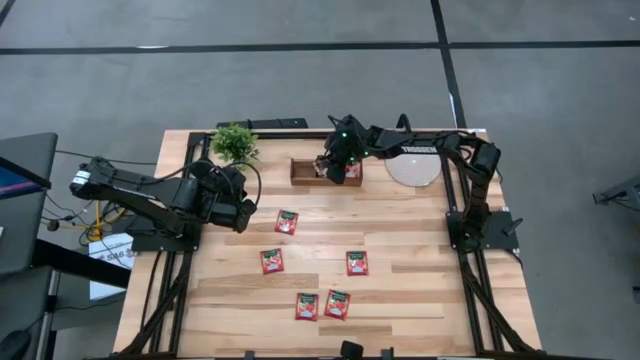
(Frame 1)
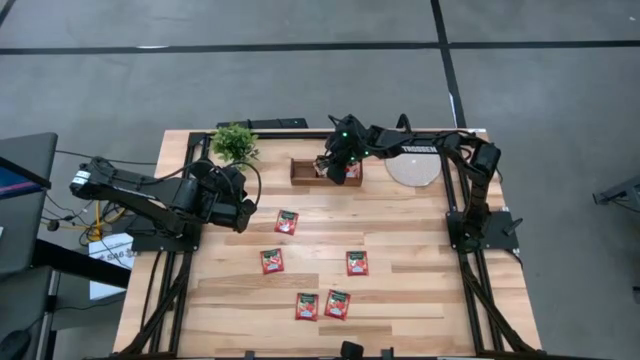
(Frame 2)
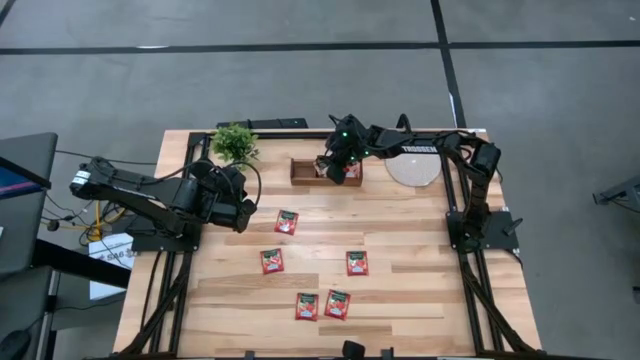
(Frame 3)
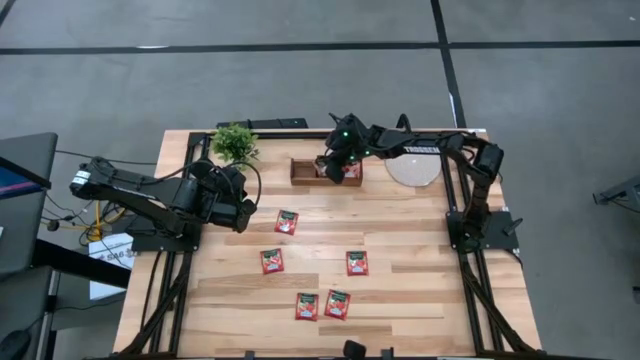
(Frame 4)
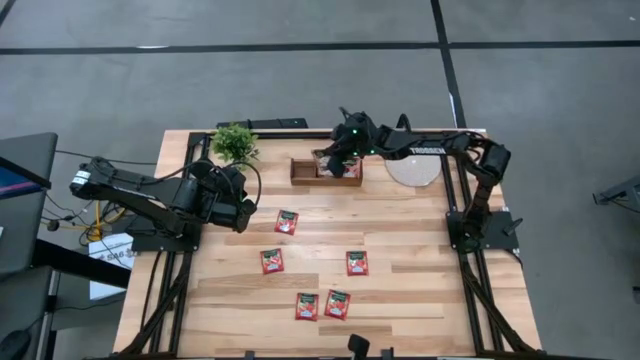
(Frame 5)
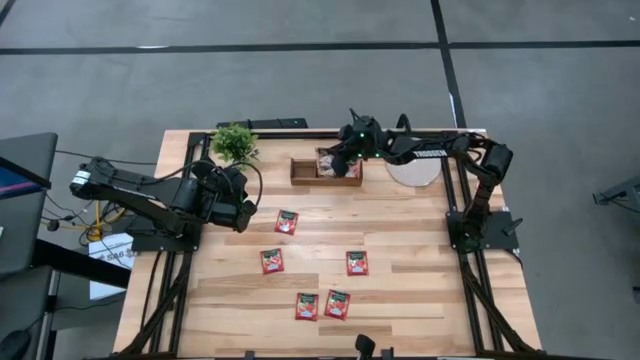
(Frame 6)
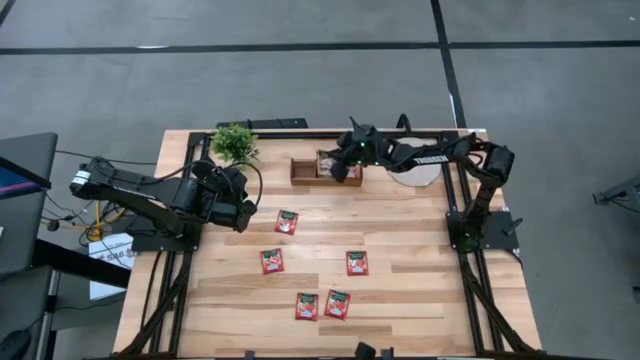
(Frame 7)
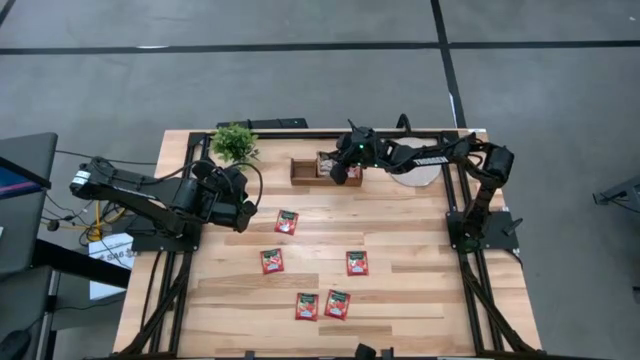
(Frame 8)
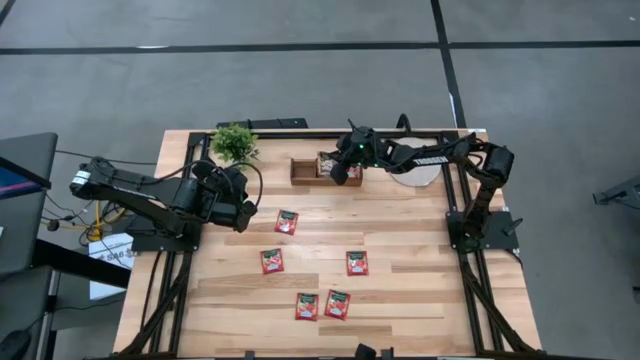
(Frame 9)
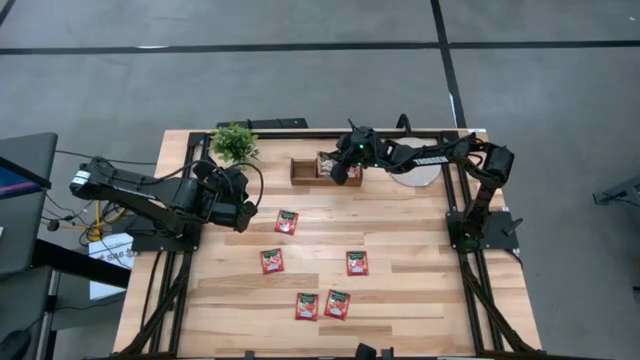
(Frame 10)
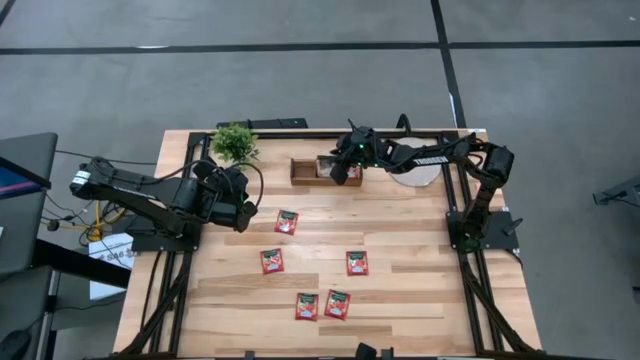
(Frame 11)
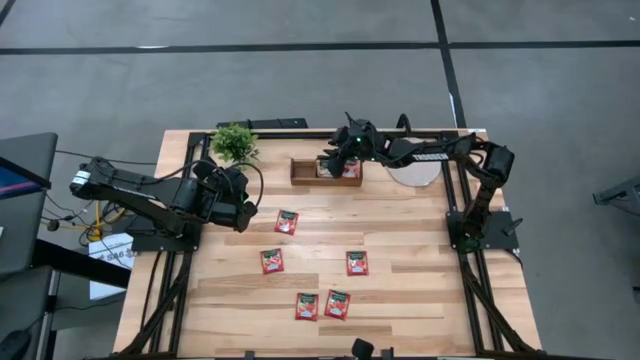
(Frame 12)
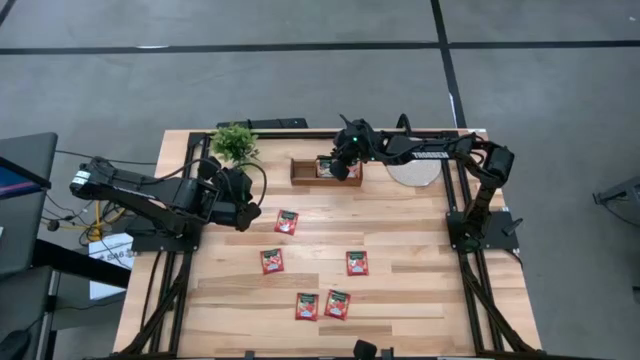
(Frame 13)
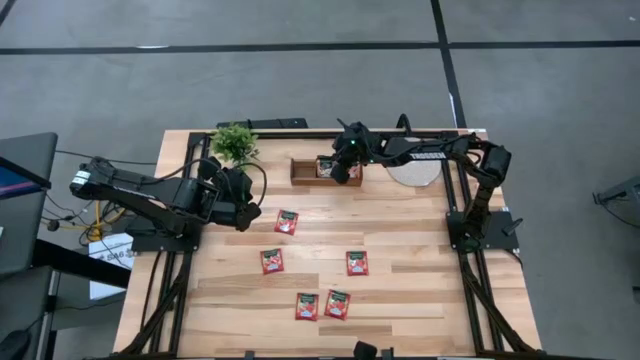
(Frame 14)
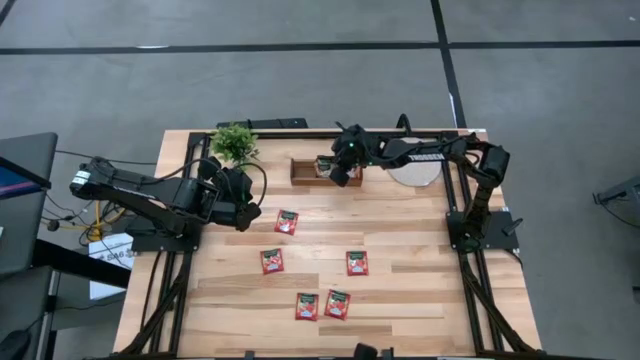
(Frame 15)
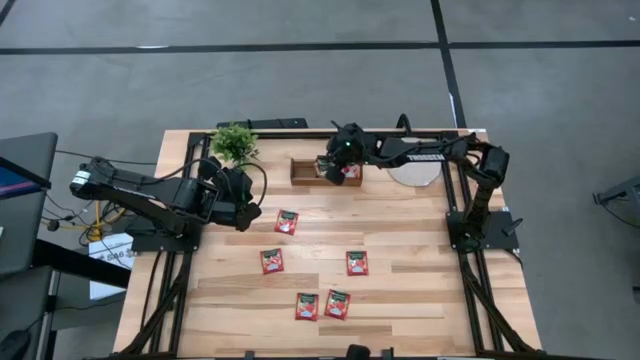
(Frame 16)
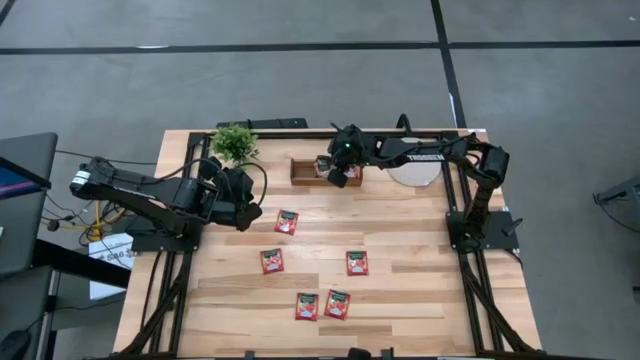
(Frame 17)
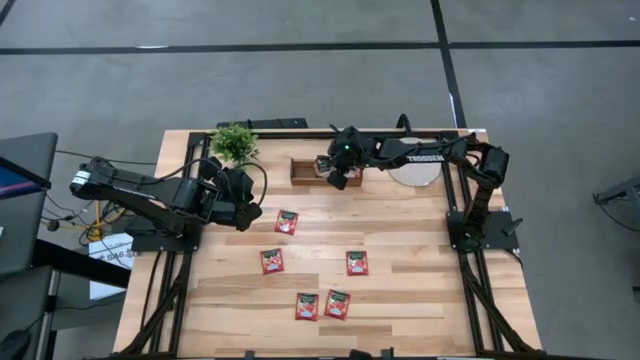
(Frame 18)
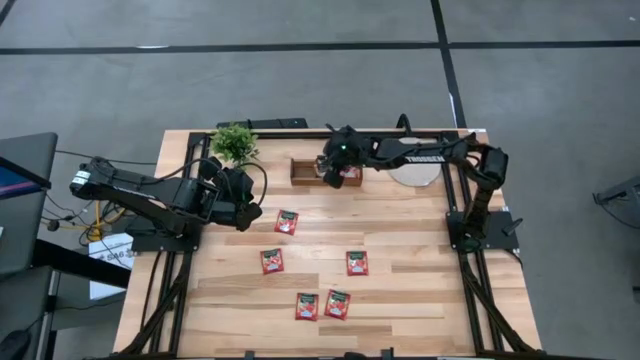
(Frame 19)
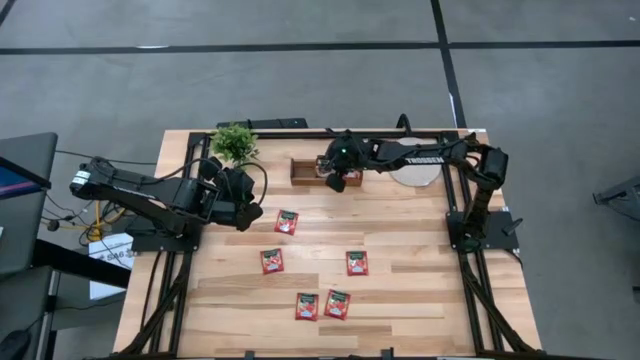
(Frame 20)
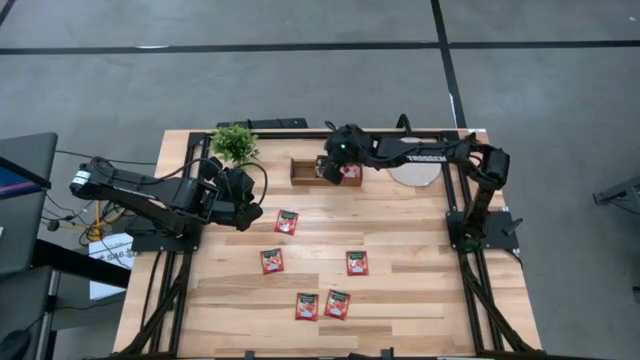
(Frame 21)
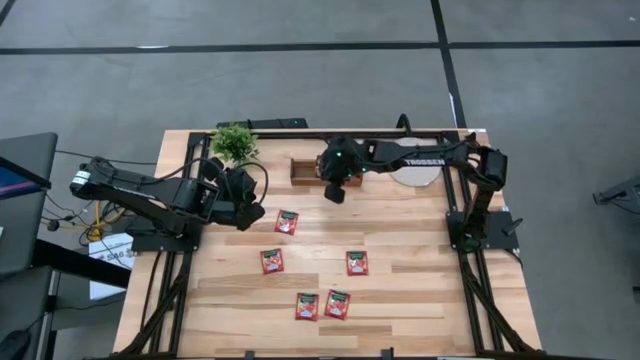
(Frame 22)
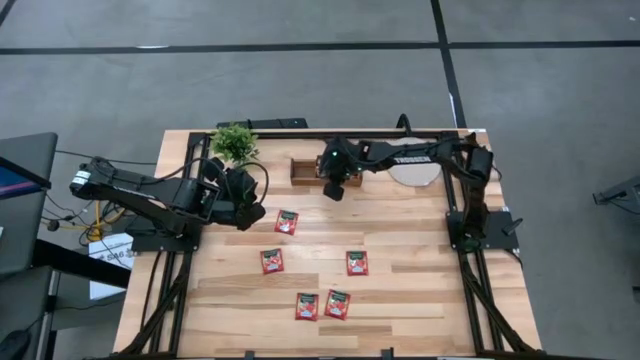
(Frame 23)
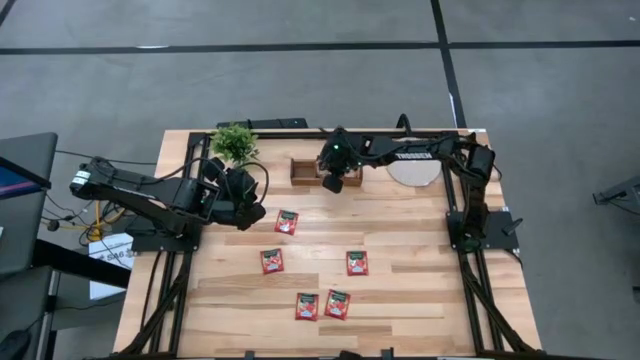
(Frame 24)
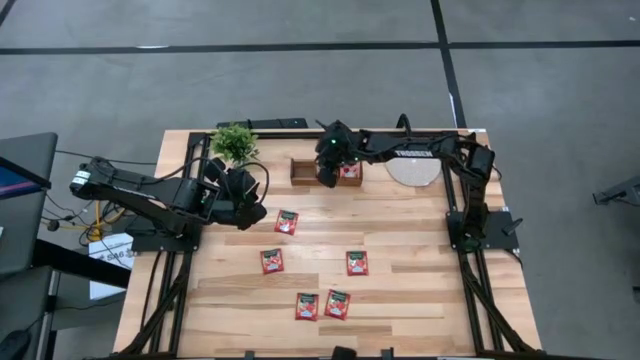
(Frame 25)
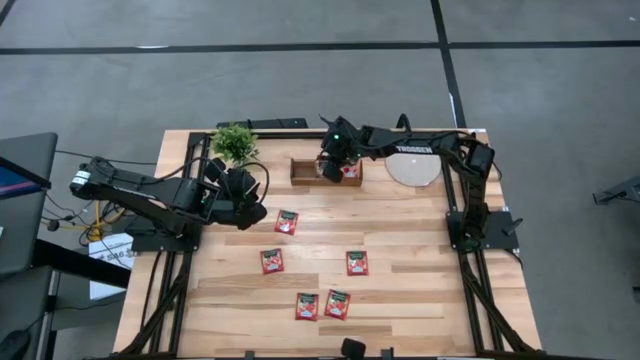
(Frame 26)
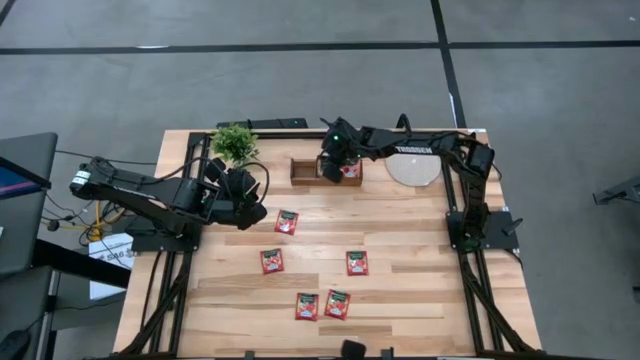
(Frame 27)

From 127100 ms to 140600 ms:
Task: Pick & Place Tea
Put the brown tea bag into the middle section of the wooden organizer

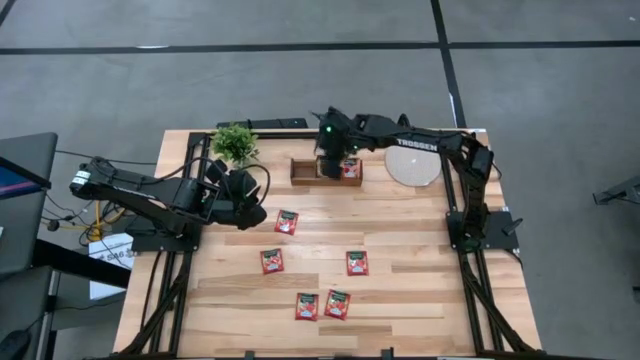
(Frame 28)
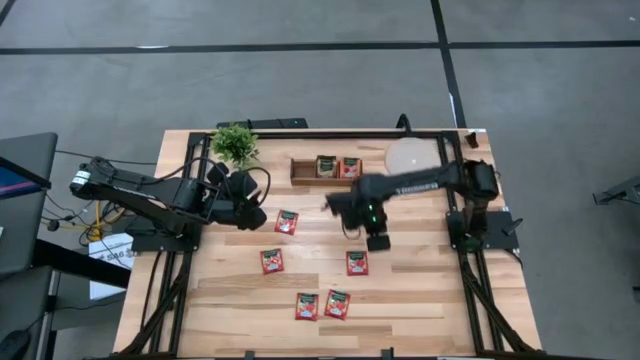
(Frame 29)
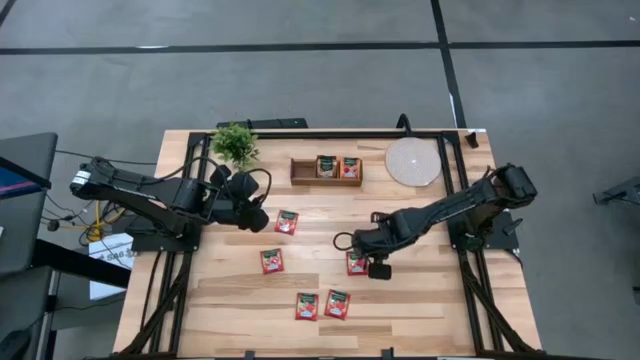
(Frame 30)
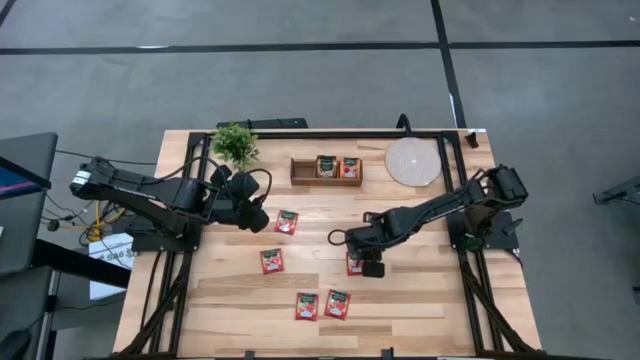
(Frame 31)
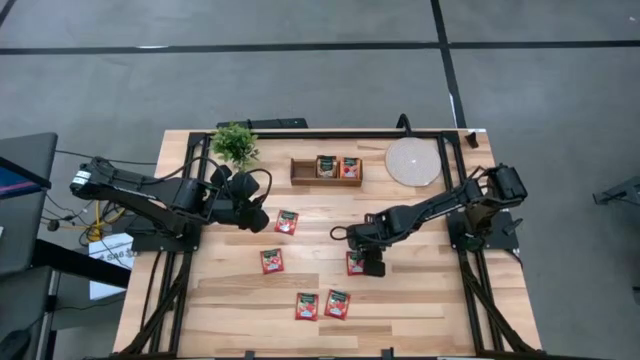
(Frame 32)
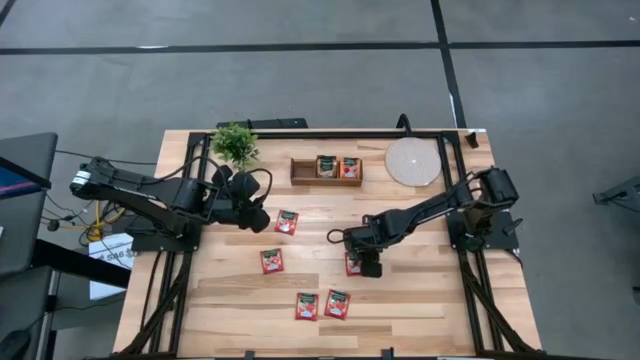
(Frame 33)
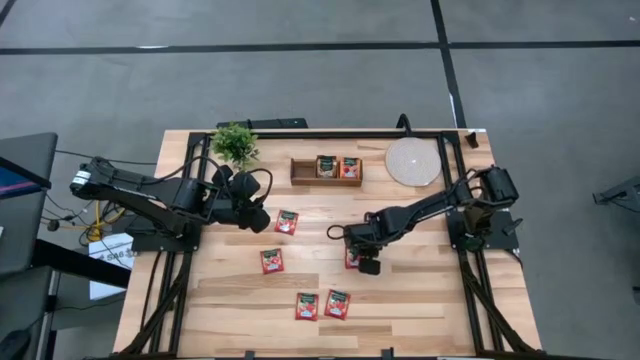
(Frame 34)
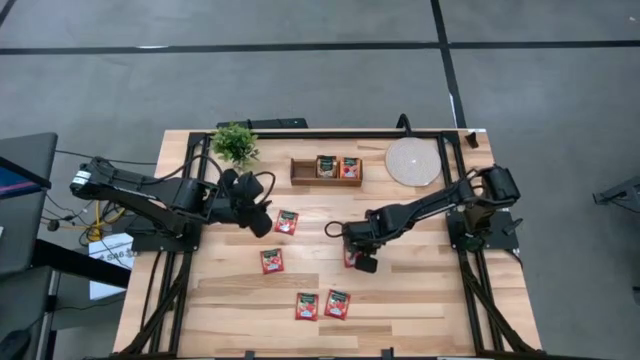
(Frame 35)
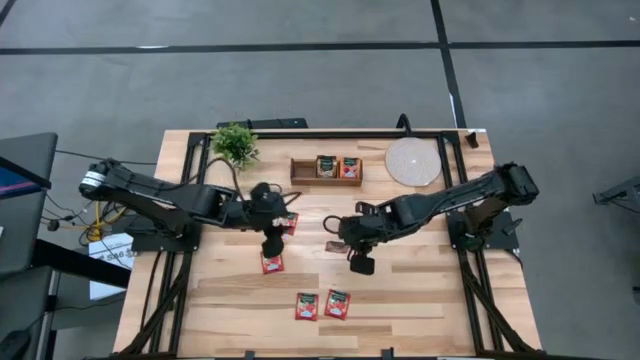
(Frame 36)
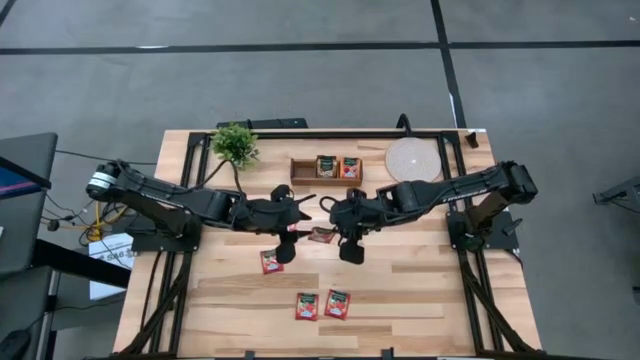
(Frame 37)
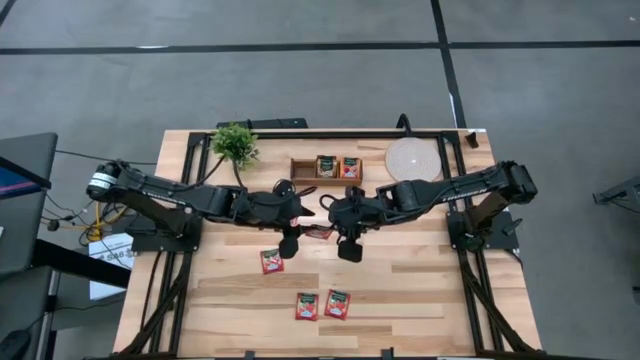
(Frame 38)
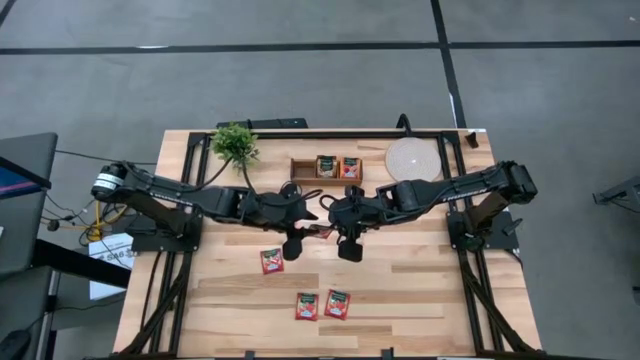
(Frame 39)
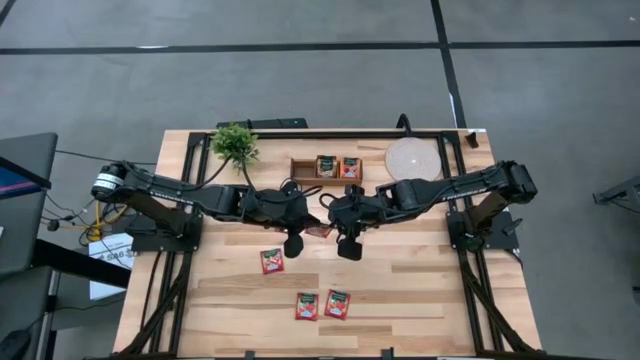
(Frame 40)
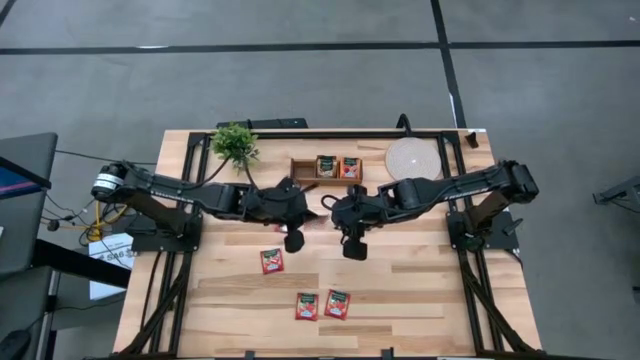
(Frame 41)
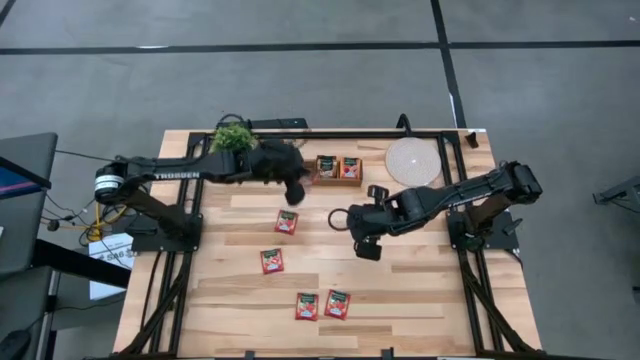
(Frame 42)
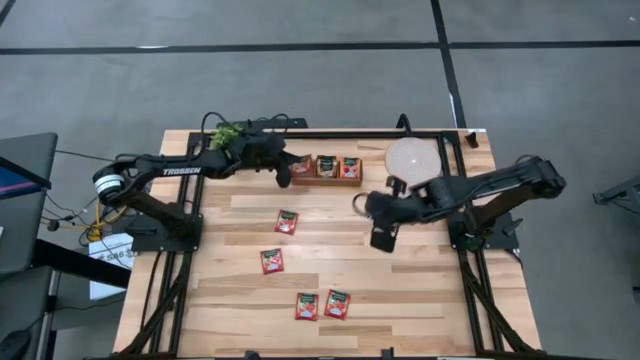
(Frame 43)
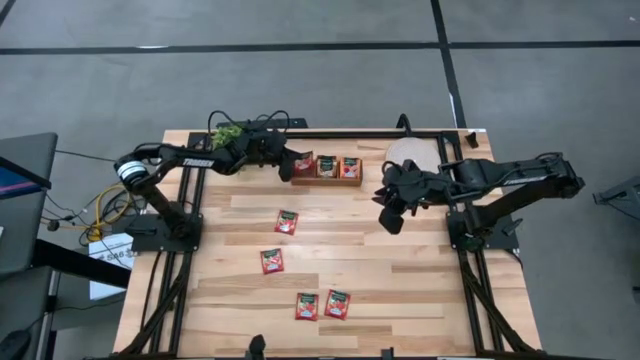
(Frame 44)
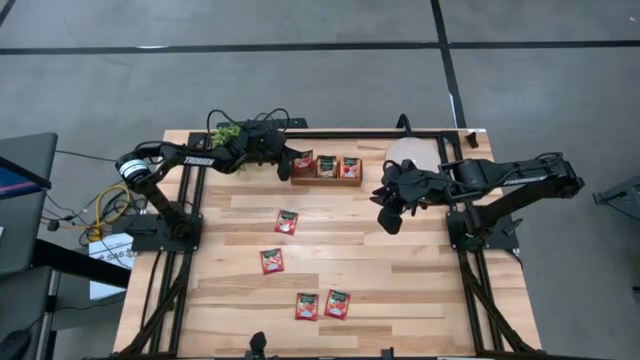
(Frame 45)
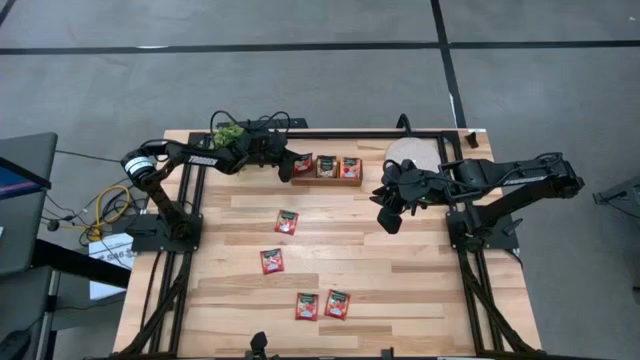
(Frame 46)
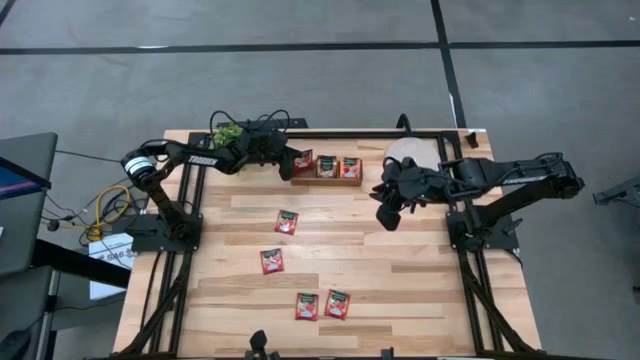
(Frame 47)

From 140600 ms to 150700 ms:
Put the red tea bag into the left section of the wooden organizer
